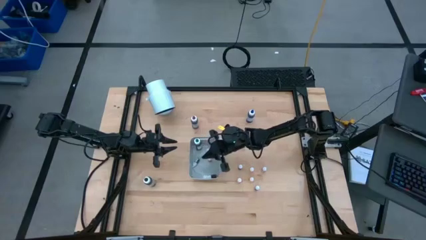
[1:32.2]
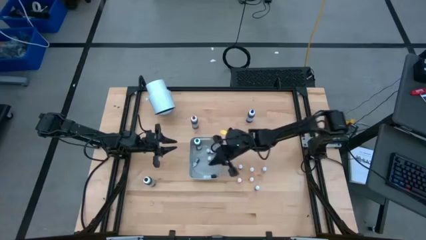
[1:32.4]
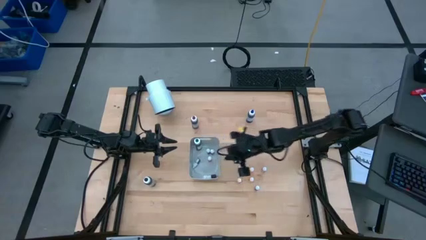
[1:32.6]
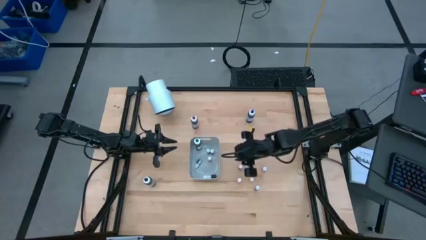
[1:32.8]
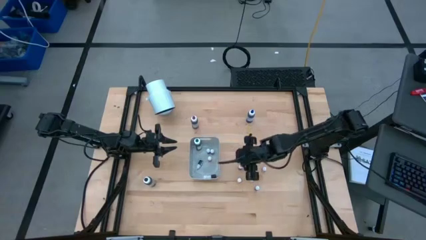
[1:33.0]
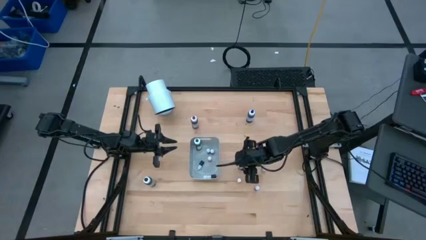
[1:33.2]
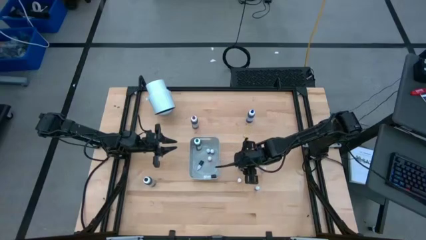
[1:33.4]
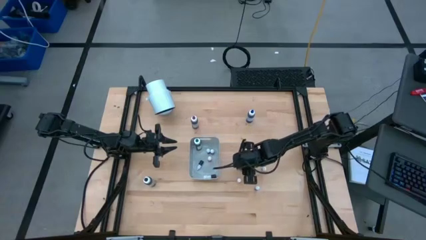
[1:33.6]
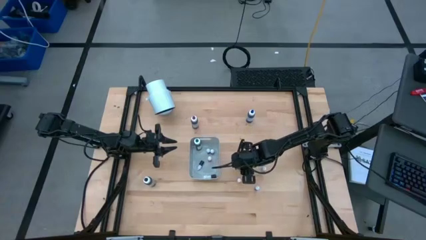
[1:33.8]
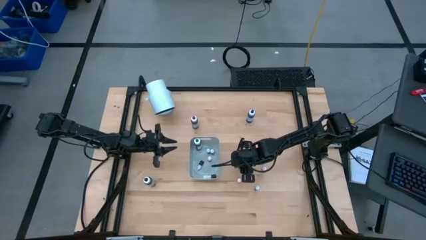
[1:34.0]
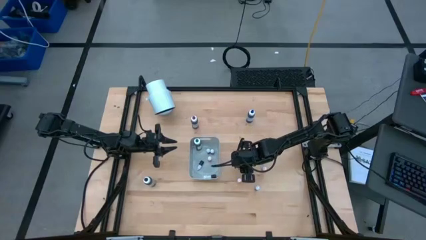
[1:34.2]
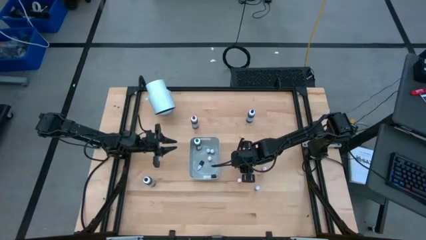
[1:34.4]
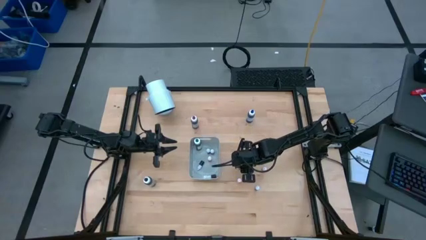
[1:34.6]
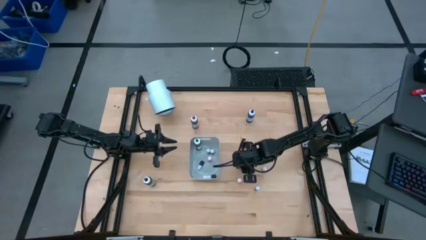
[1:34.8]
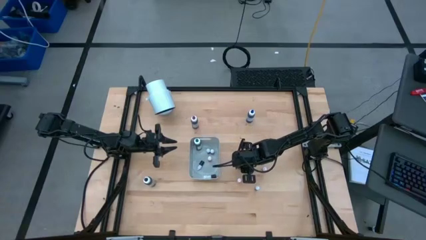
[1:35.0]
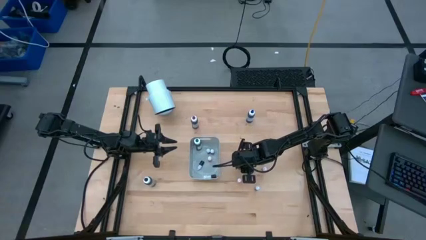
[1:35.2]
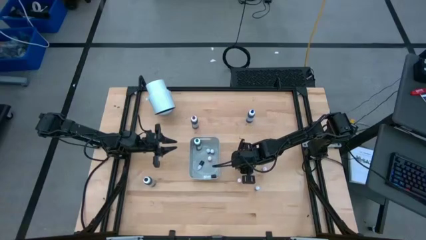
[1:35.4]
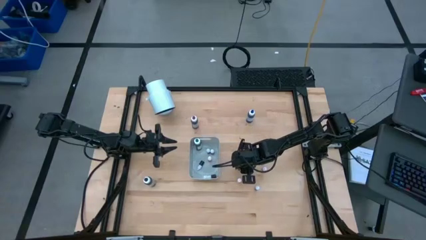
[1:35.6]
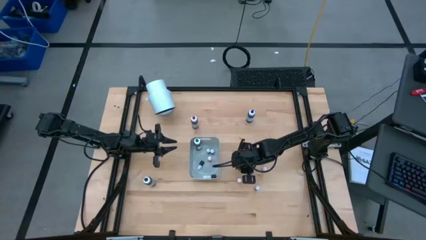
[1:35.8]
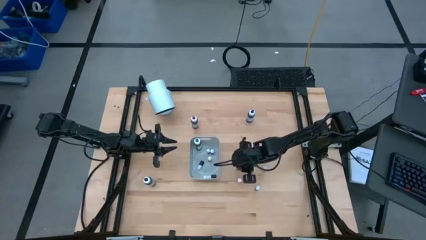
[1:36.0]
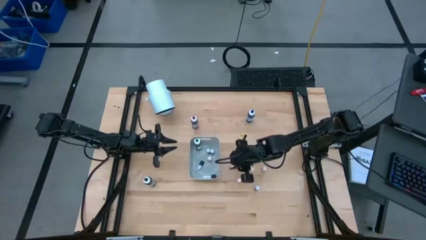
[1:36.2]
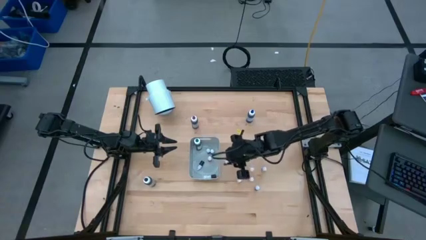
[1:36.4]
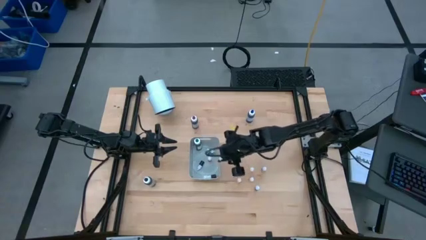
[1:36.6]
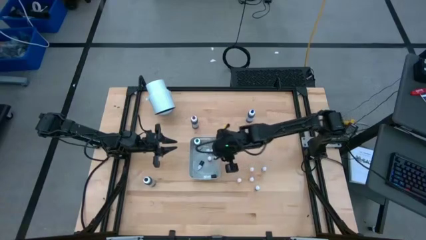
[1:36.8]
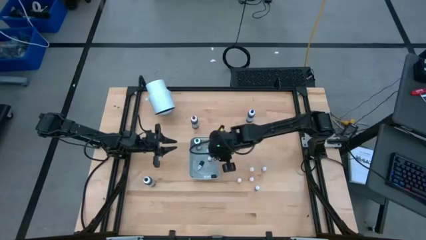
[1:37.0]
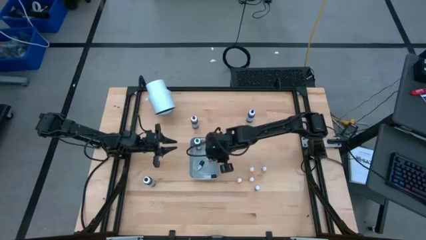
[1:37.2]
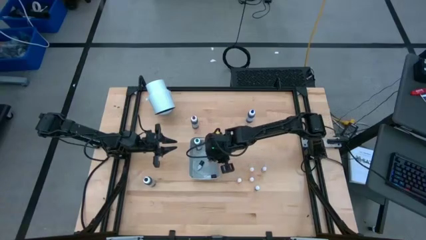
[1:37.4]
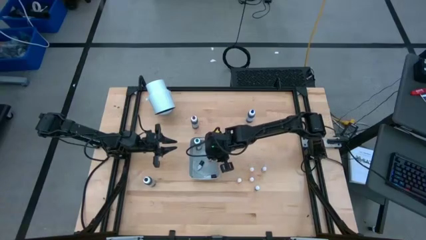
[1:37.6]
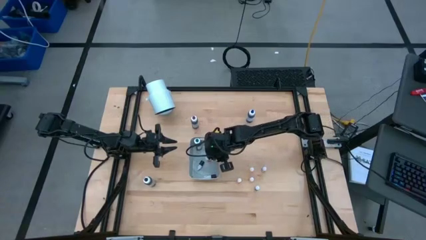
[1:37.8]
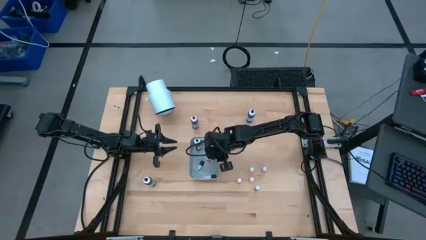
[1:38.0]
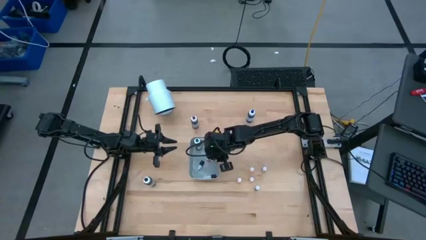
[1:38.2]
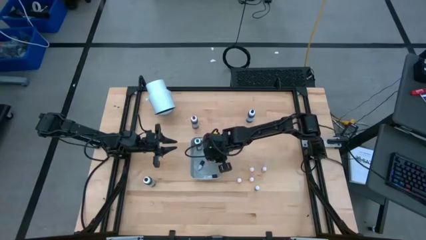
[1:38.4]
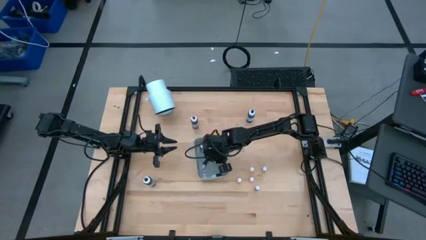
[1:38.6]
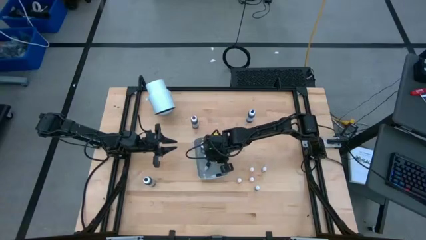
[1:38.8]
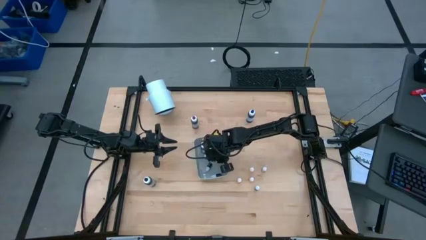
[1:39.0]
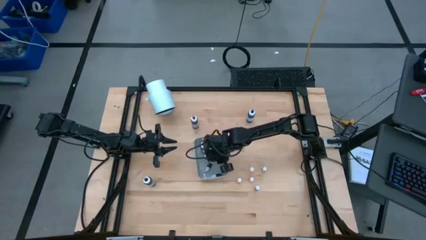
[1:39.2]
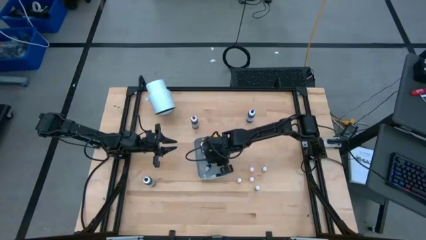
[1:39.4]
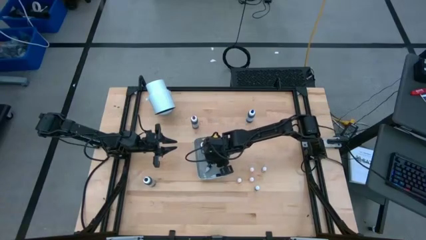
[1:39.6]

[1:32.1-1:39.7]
Task: Pick & Place food coloring
Put the blue food coloring bottle into the bin

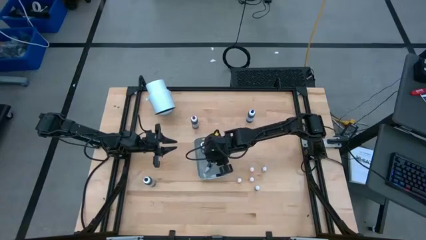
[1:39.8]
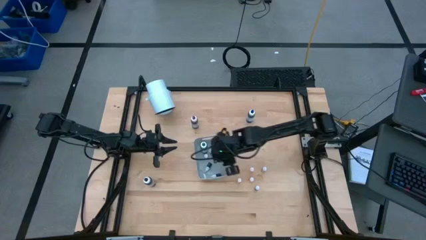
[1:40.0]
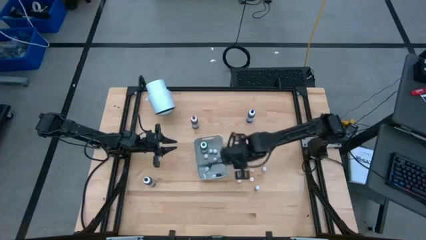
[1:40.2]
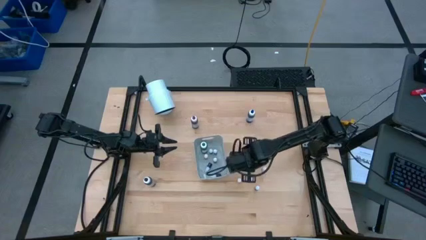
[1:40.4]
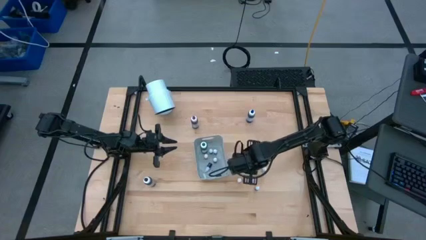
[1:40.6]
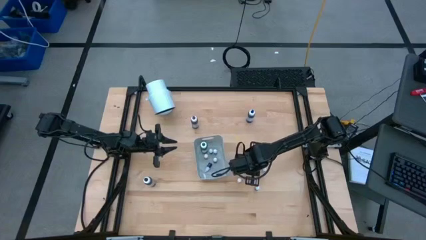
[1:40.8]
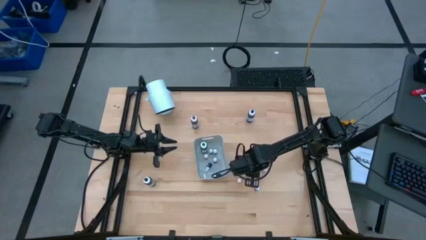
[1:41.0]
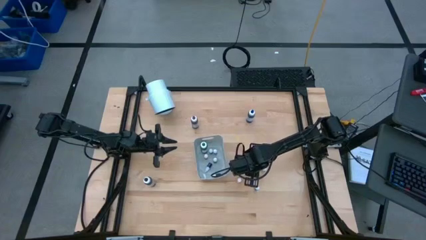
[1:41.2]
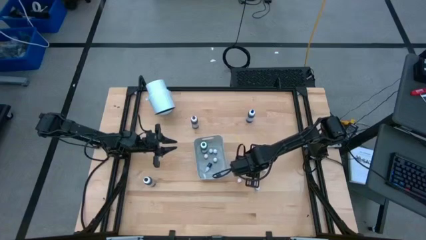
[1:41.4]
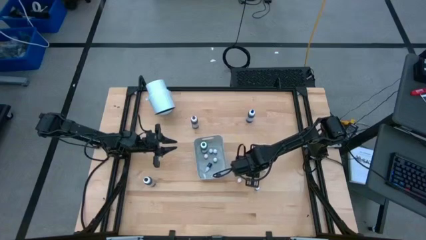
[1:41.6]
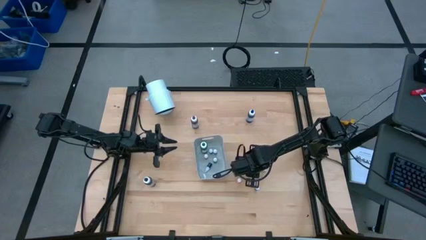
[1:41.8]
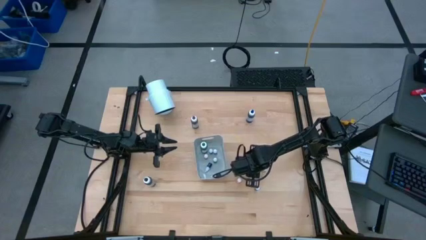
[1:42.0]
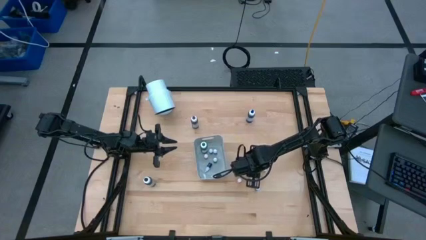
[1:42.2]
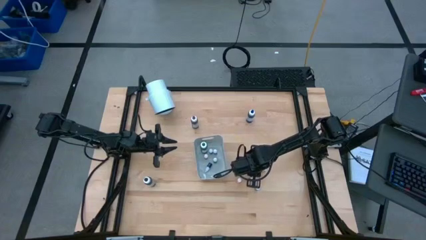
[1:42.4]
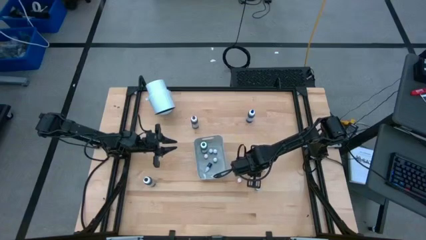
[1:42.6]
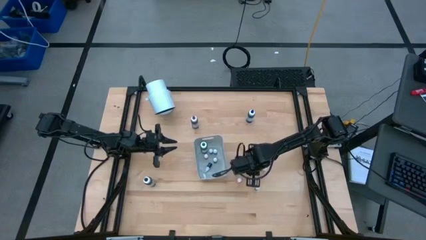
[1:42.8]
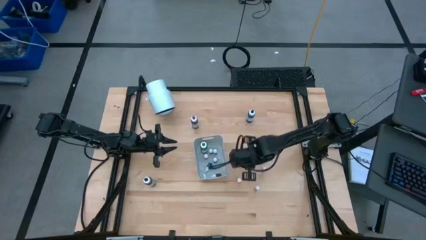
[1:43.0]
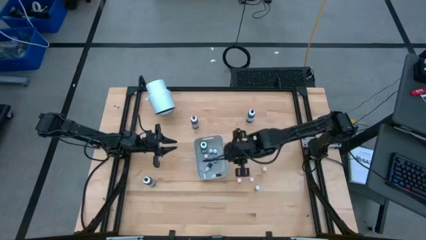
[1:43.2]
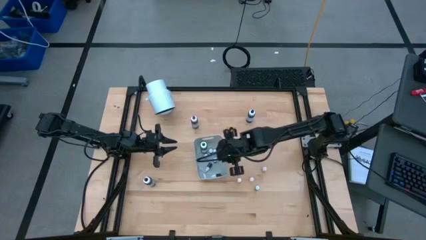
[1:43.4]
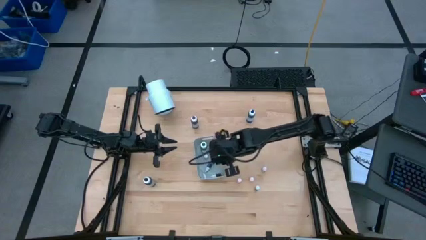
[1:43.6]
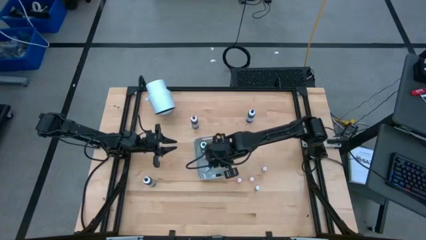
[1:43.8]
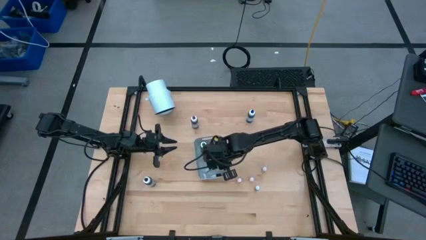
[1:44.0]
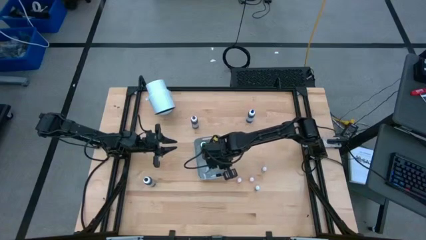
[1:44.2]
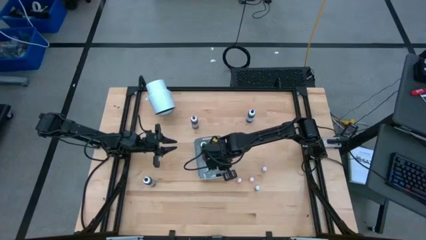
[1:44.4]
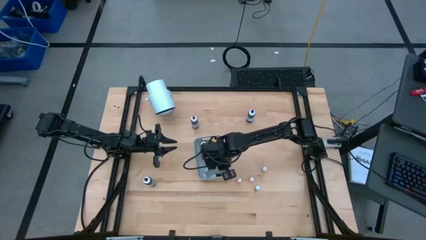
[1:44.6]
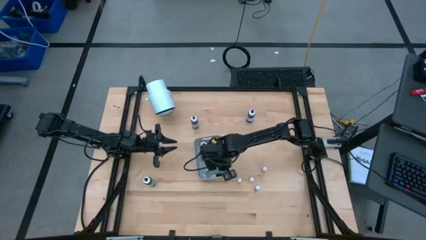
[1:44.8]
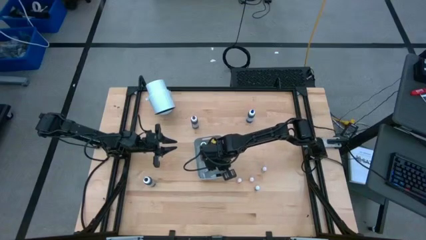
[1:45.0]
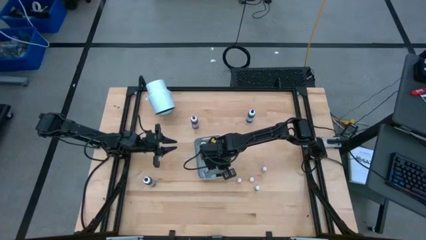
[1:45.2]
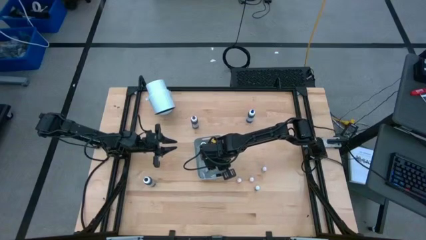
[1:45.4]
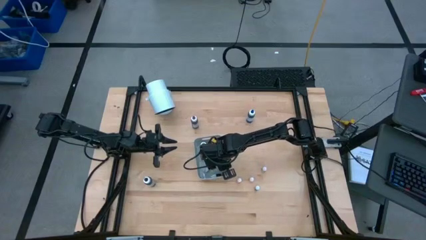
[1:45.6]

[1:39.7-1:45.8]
Put the top yellow food coloring bottle into the bin

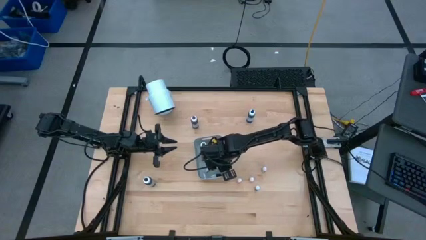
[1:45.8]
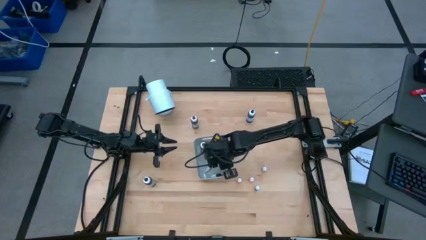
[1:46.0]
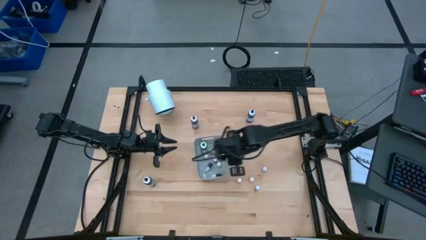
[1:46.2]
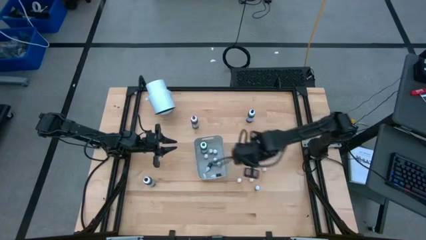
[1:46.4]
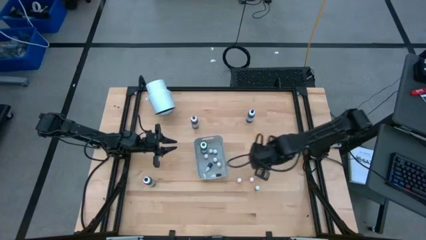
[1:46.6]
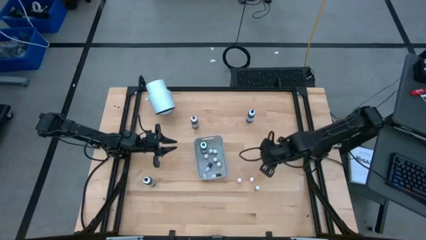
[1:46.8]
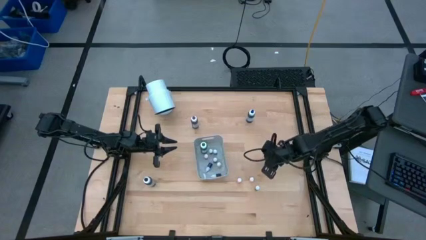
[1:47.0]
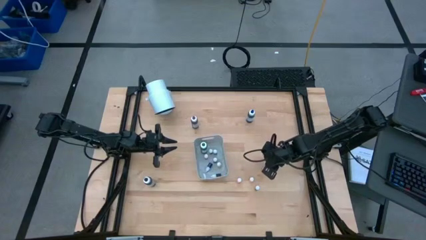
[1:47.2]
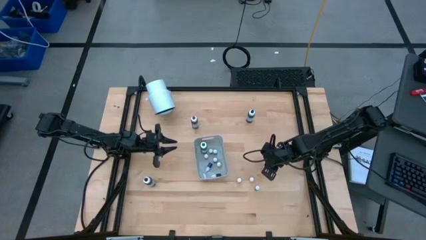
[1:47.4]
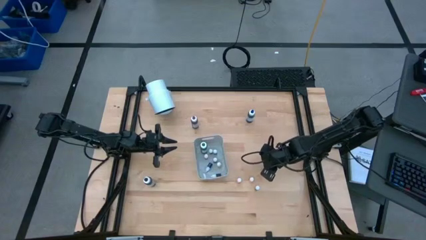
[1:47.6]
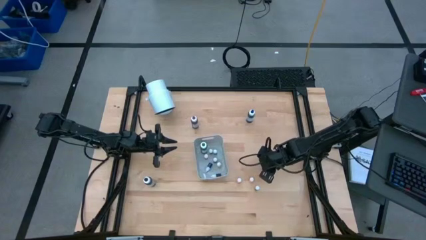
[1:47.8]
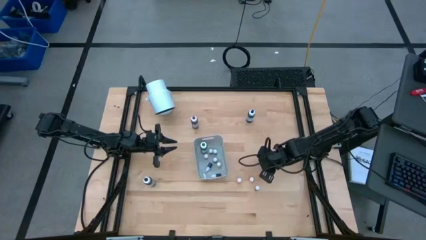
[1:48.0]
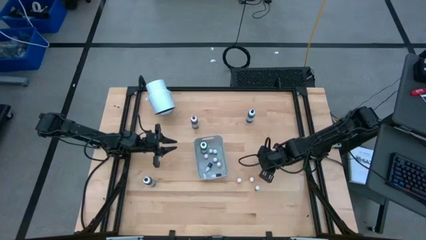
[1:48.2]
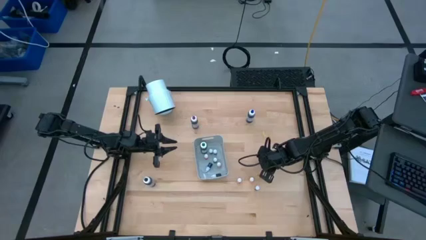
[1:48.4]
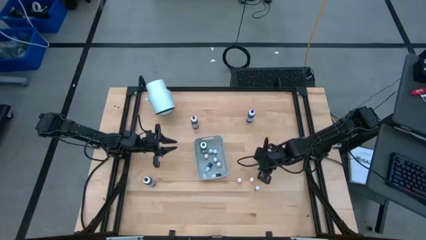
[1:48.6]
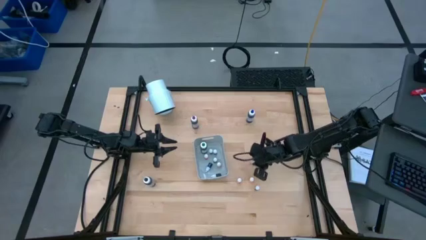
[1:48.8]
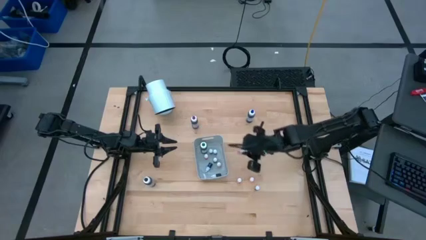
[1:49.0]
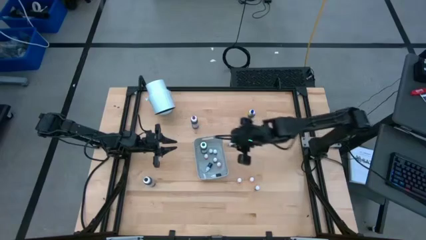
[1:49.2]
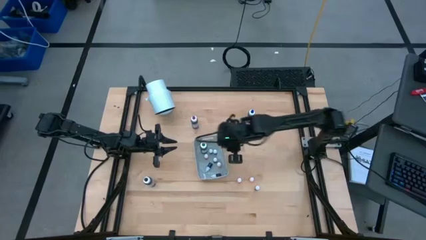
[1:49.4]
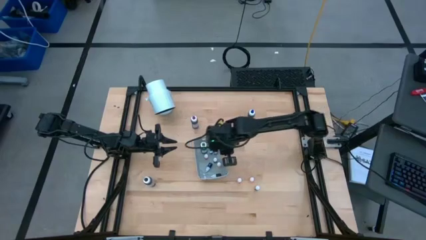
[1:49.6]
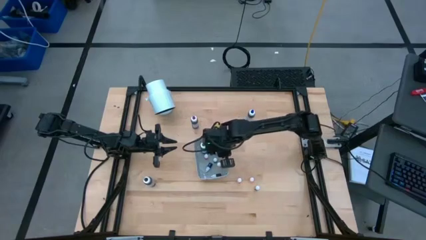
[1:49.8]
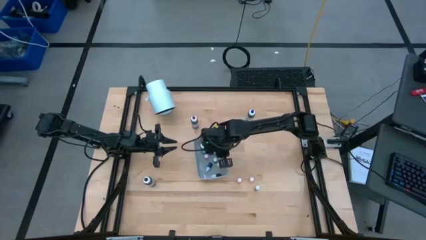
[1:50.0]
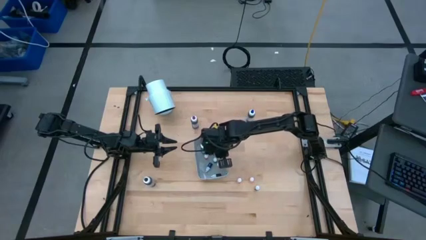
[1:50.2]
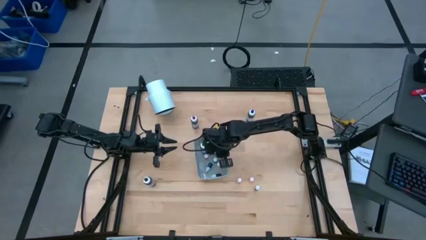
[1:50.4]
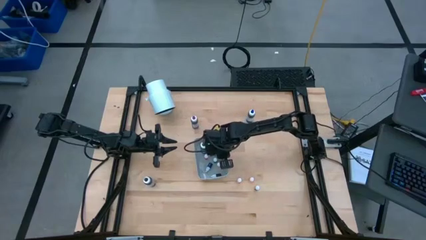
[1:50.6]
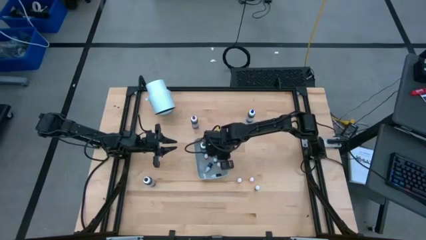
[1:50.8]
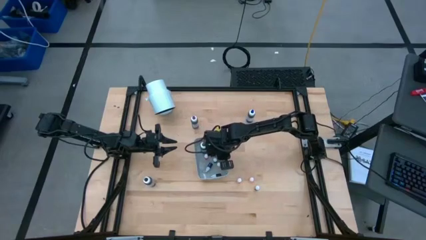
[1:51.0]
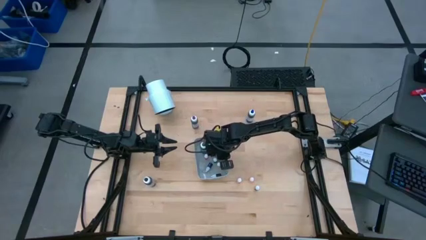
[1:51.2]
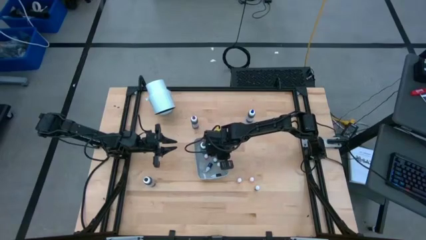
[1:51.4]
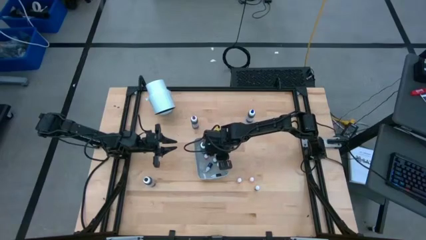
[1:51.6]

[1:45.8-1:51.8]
Put the orange food coloring bottle into the bin
